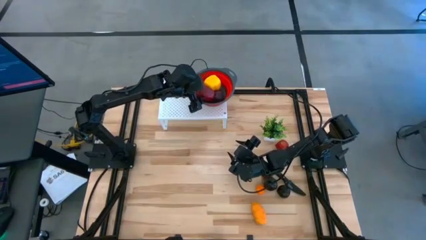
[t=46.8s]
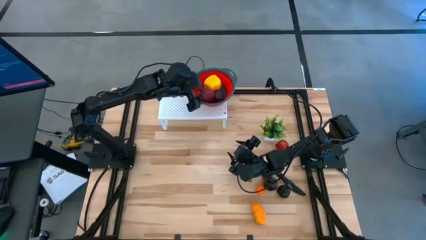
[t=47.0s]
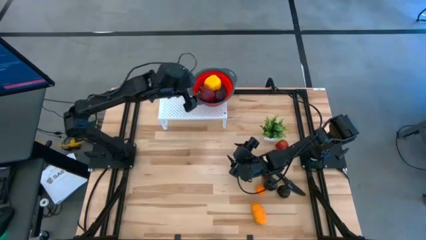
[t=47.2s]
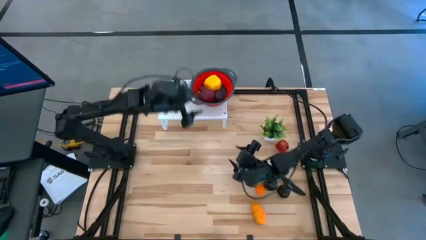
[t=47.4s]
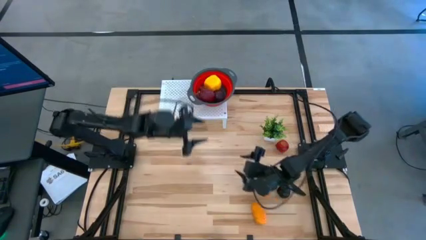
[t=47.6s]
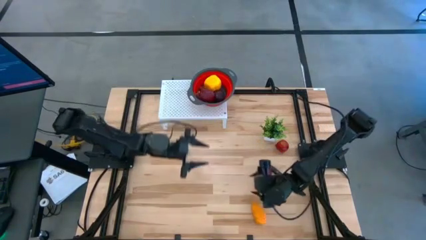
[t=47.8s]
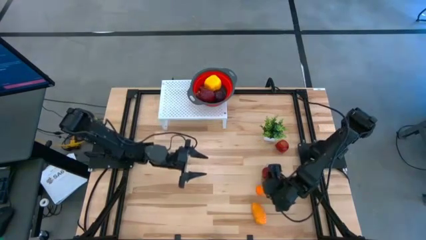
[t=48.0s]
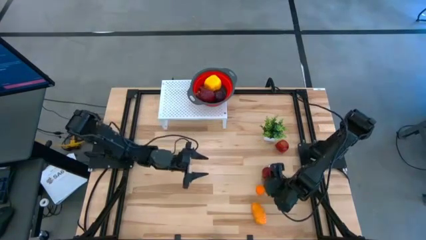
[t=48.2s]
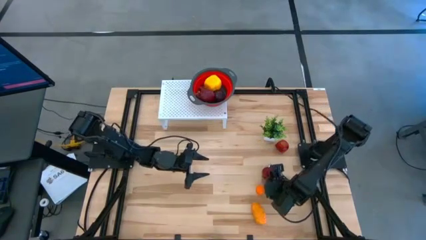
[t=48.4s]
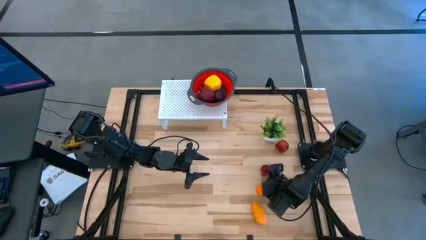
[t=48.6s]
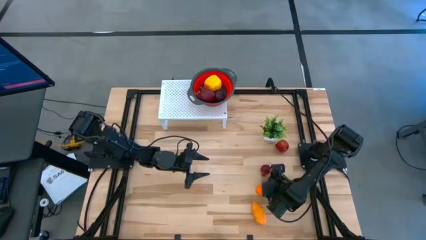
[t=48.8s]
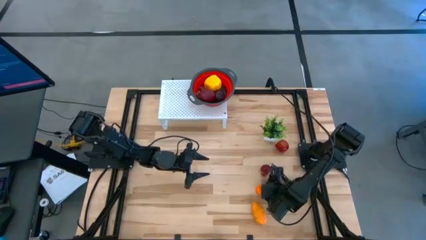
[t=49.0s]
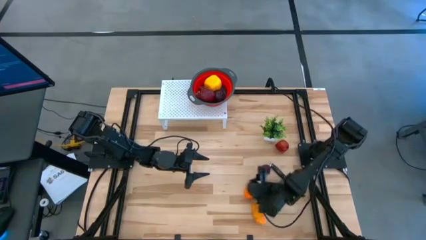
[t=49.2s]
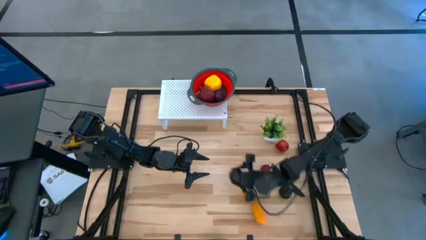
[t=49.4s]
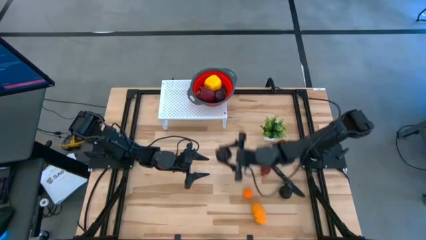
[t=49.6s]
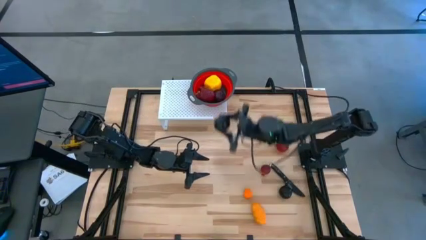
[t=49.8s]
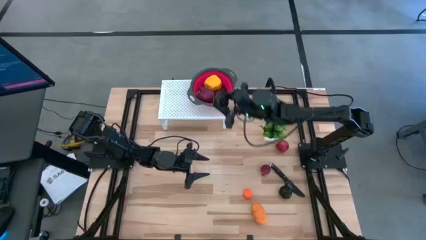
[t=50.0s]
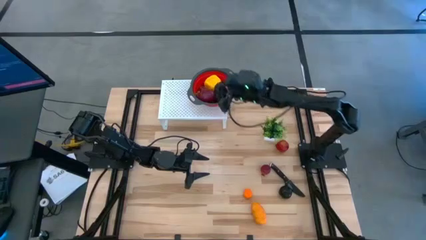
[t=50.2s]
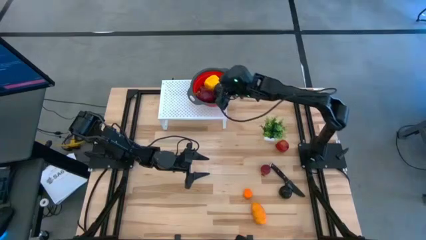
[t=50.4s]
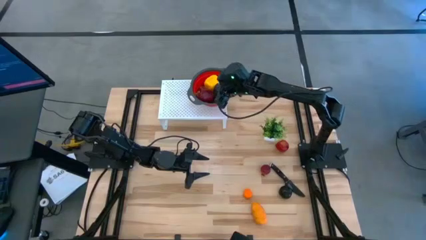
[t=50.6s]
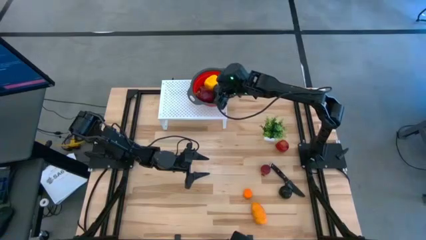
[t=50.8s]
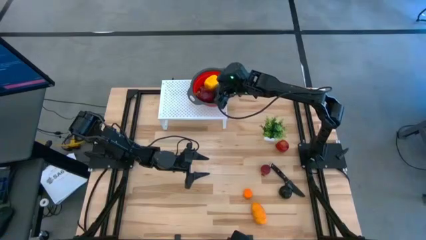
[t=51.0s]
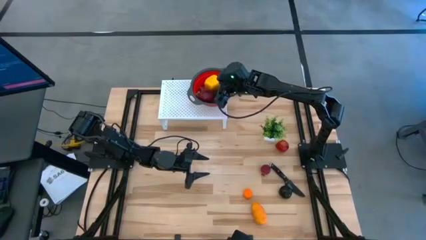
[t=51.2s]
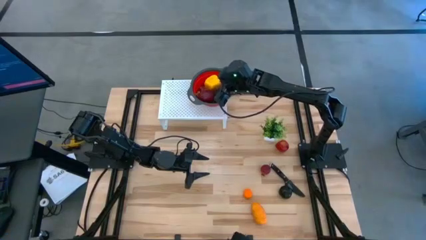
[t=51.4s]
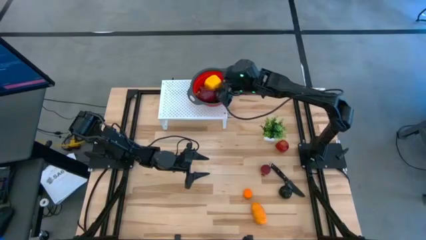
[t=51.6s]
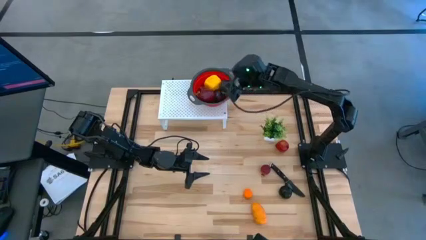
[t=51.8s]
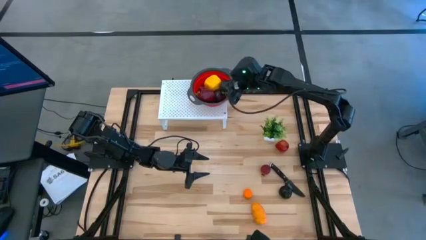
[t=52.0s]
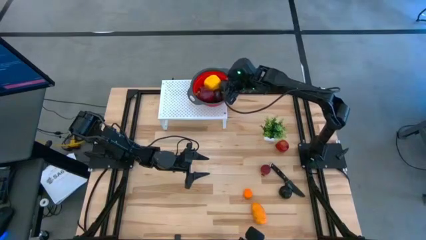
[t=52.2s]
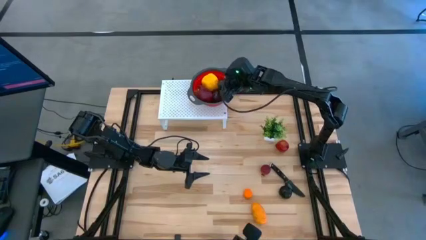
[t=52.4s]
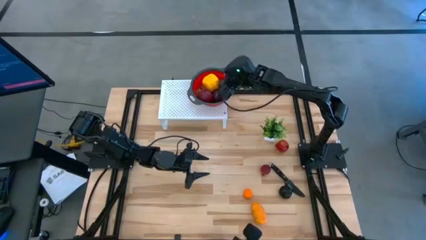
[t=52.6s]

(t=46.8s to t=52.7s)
Task: Pick & Place Fruit
Put the left black plum into the red strainer bowl on the shelf

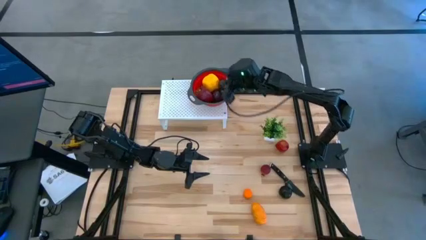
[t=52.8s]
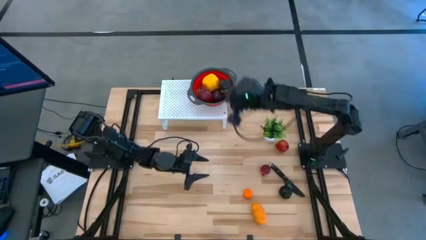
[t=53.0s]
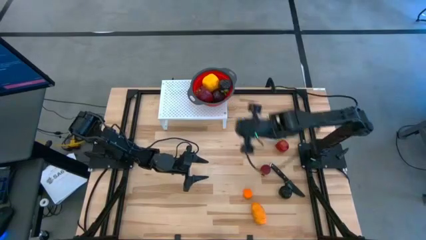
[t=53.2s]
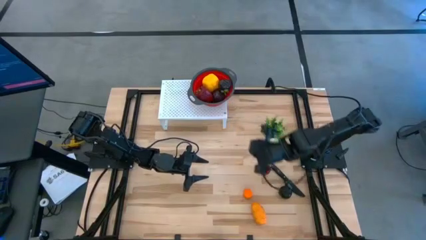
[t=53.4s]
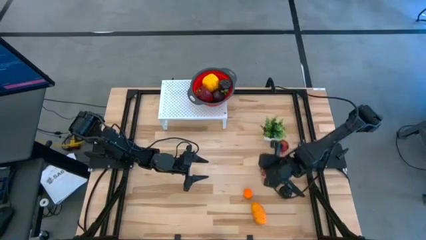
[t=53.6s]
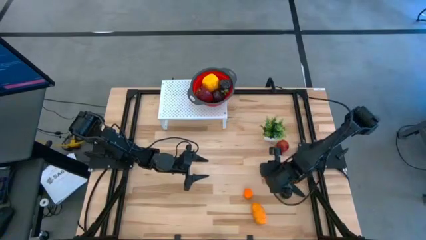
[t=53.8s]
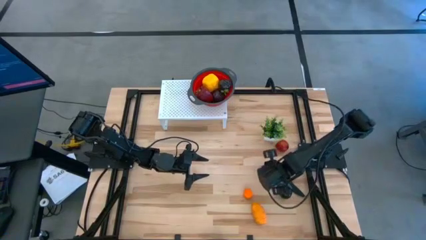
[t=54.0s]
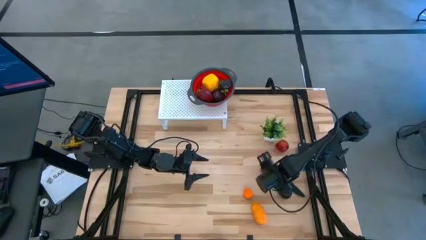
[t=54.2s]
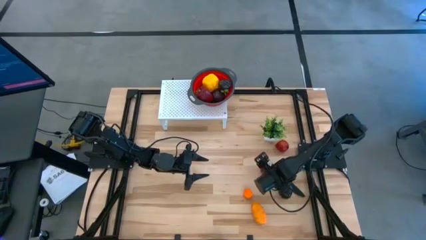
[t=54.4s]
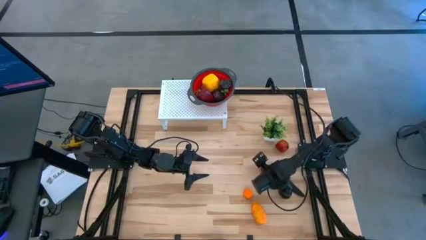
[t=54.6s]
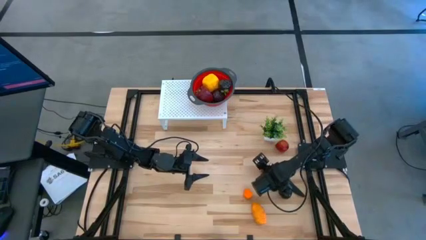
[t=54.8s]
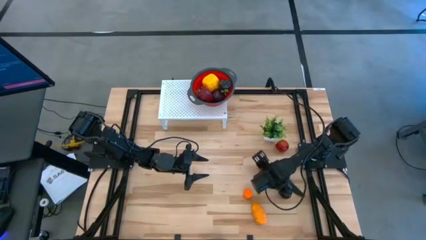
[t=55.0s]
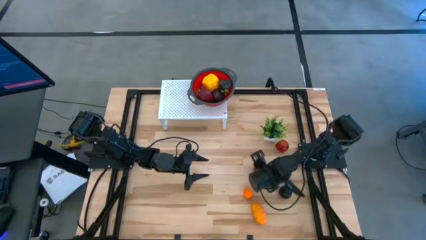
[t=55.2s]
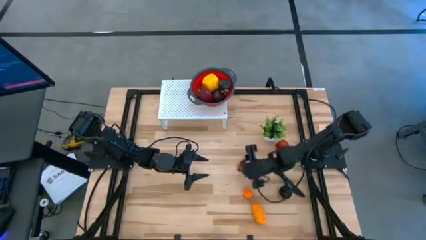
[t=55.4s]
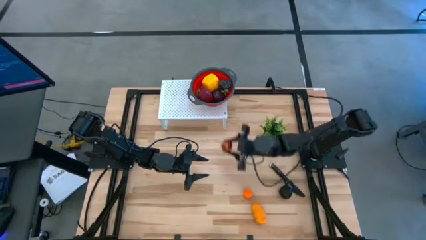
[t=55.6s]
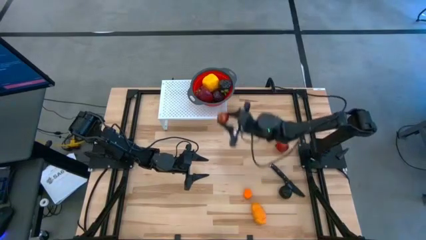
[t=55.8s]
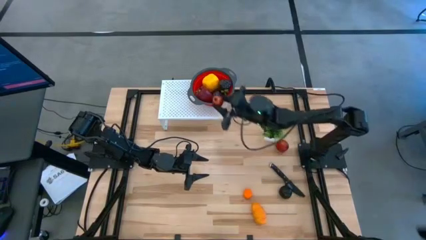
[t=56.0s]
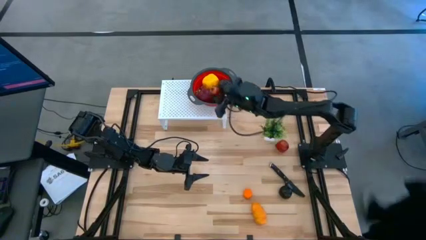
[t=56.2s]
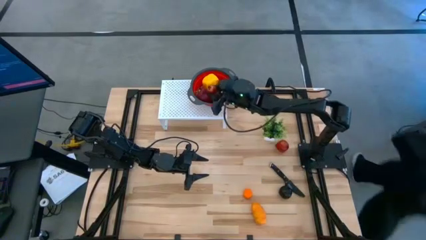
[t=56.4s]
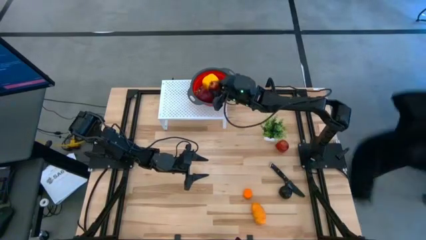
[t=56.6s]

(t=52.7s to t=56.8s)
Put the red pomegranate into the red strainer bowl on the shelf

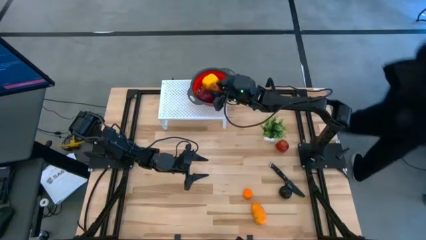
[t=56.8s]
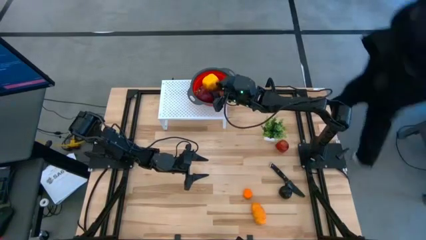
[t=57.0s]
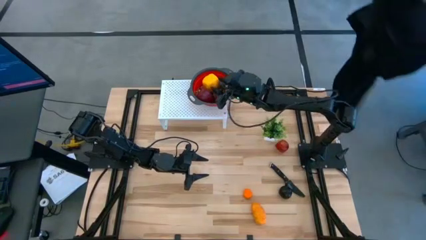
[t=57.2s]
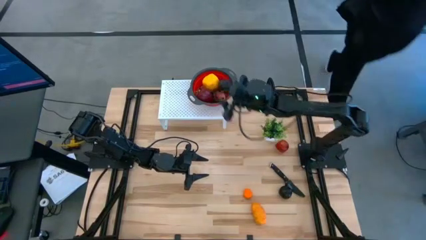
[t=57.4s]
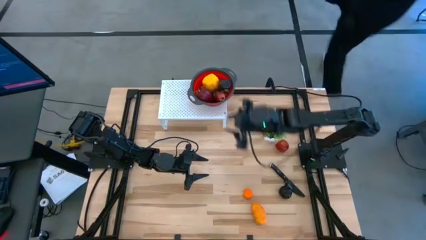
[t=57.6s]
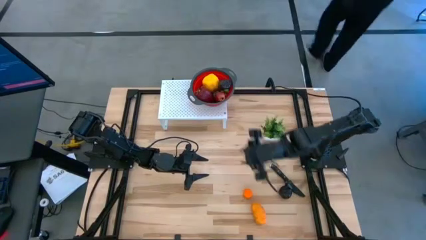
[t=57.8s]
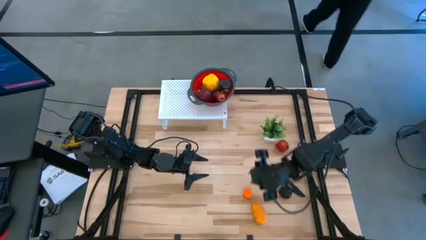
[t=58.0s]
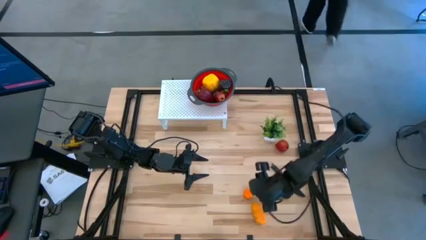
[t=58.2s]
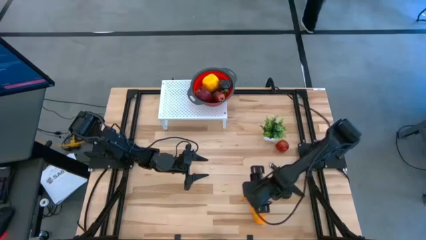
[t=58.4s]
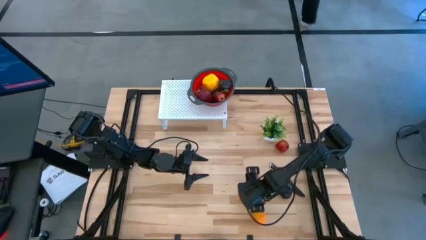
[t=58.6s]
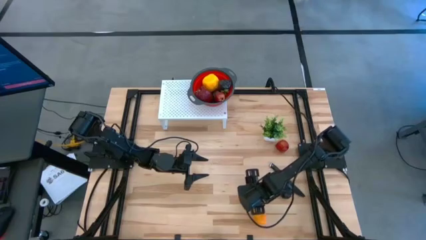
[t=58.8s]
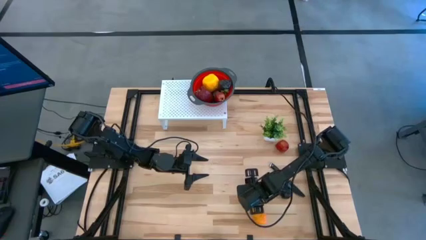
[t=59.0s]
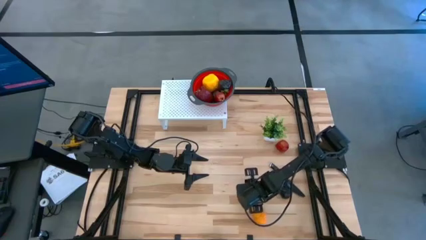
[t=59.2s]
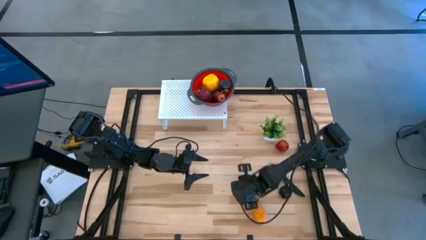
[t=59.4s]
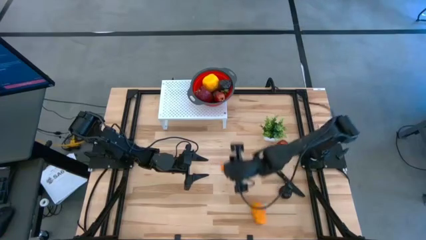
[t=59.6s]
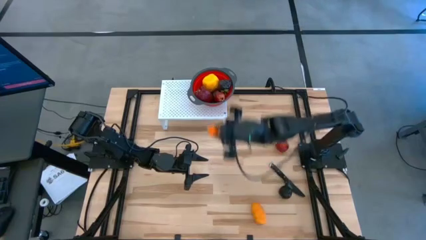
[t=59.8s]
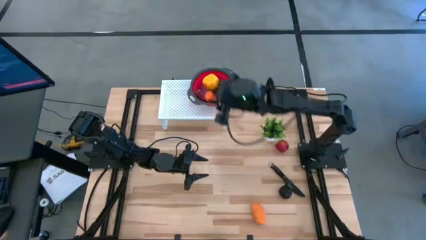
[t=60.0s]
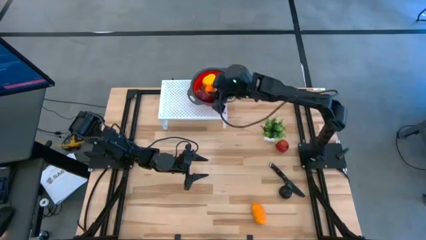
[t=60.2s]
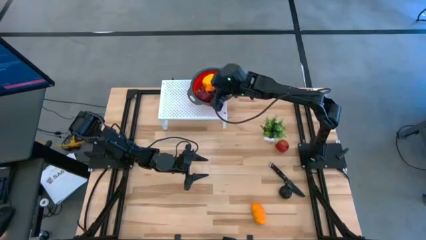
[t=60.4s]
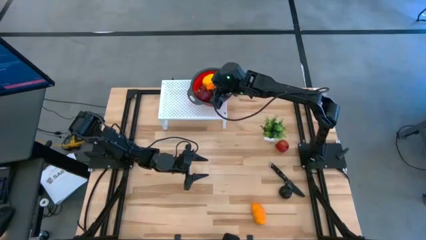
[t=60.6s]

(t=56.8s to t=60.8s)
Put the orange tangerine into the red strainer bowl on the shelf

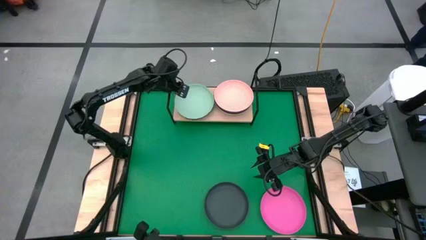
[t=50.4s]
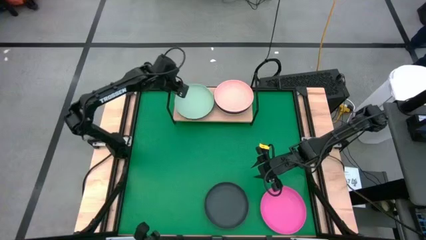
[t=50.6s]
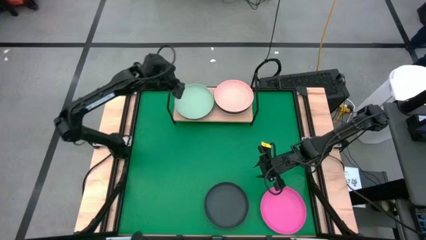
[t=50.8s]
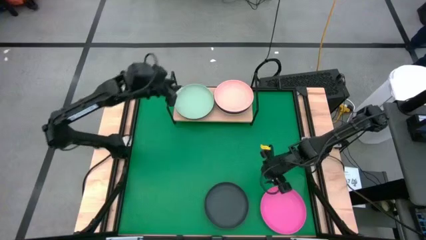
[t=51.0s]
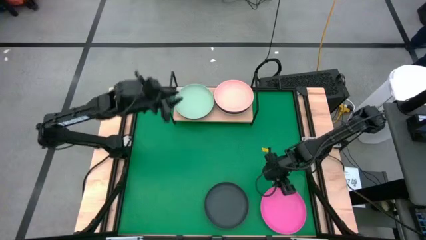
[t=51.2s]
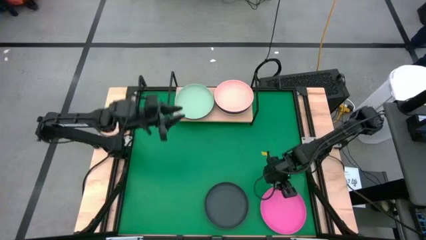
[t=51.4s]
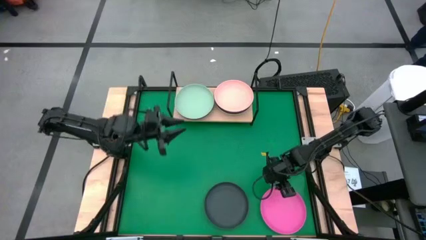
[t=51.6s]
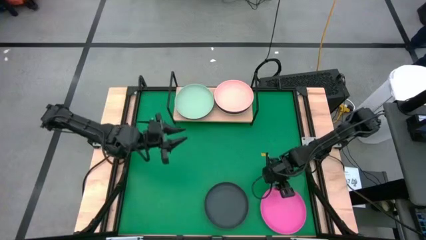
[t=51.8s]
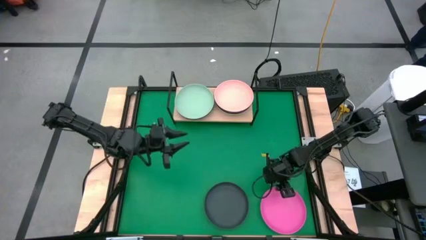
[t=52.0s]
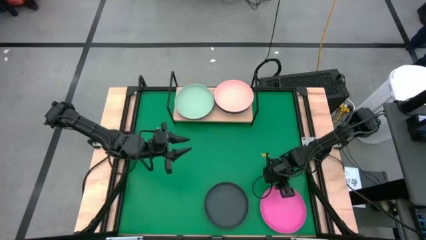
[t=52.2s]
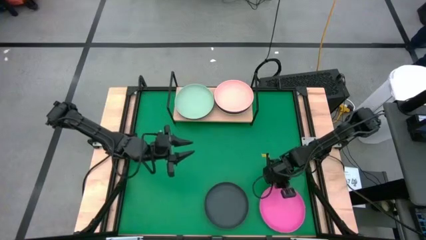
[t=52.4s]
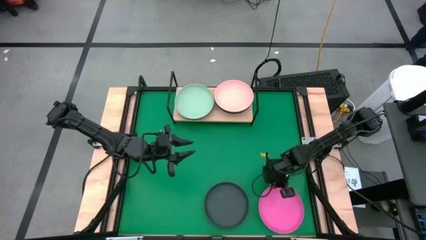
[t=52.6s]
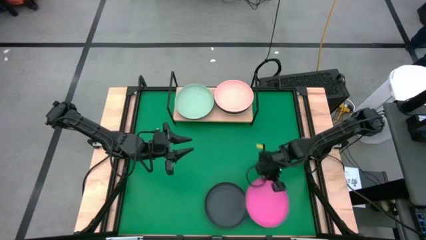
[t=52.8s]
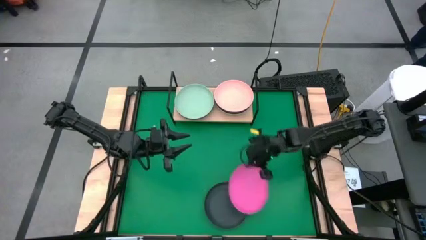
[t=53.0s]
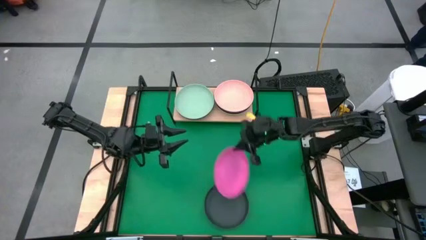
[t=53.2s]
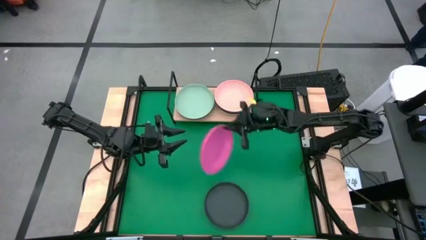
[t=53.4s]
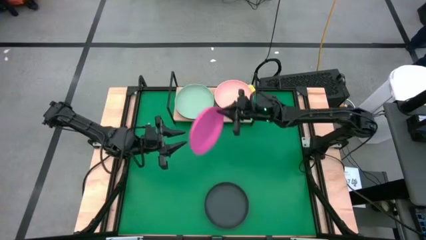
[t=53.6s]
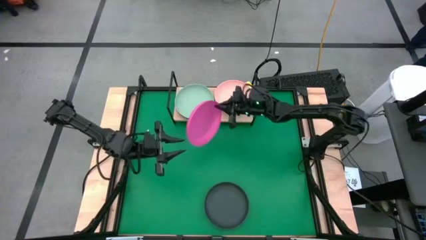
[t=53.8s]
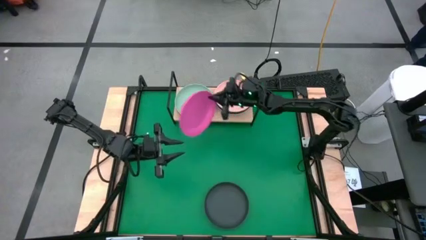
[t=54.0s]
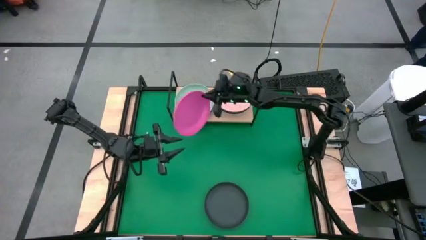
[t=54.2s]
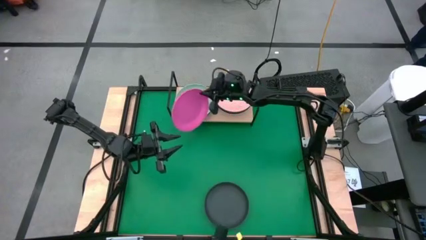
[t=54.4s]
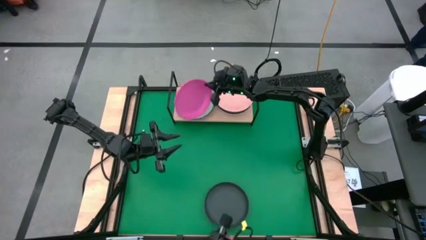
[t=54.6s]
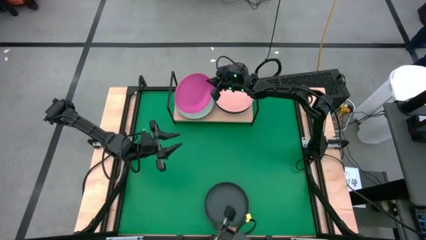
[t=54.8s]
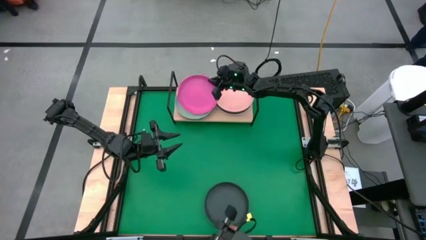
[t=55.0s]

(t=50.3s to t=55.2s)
Task: Place and stack plates onto a shelf
Stack the pink plate on top of the gray plate on the shelf
